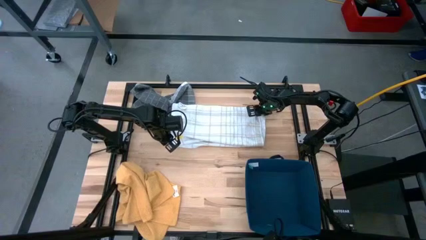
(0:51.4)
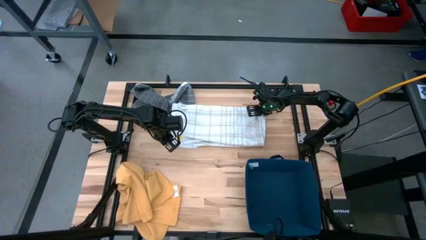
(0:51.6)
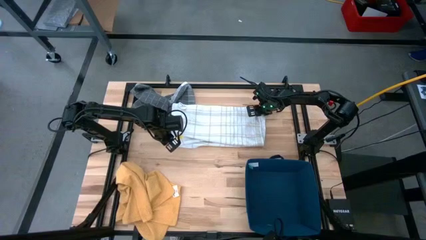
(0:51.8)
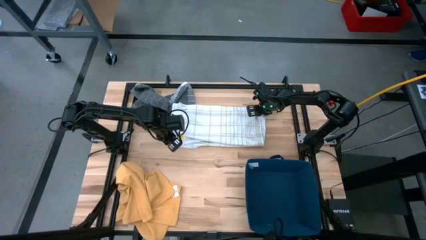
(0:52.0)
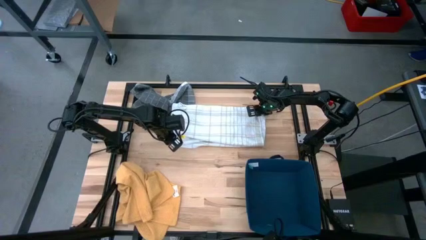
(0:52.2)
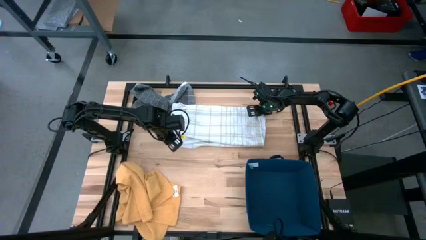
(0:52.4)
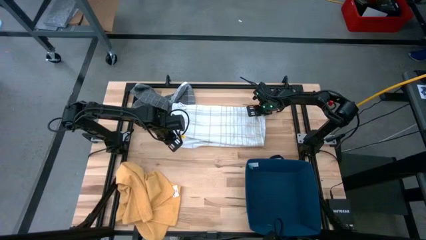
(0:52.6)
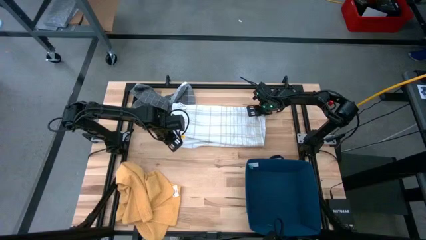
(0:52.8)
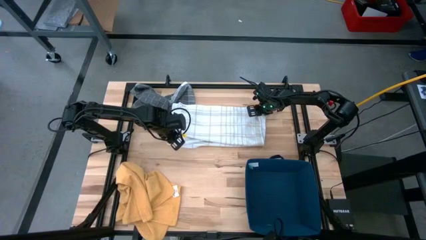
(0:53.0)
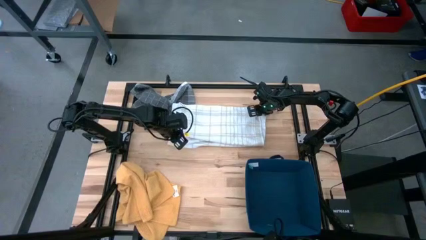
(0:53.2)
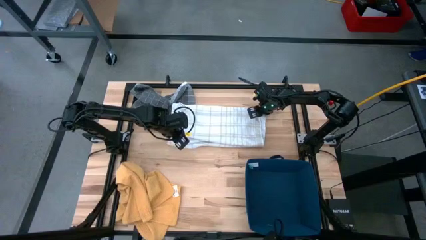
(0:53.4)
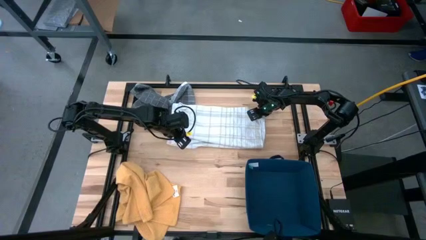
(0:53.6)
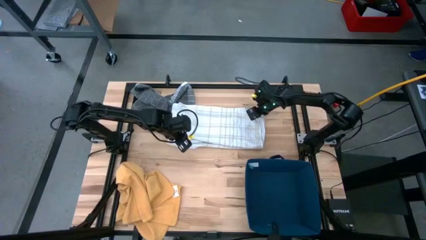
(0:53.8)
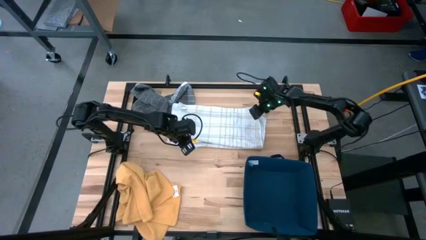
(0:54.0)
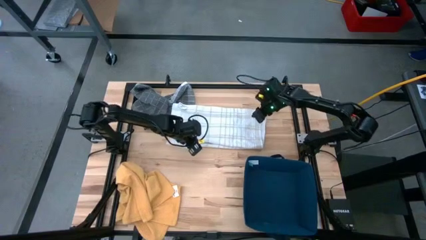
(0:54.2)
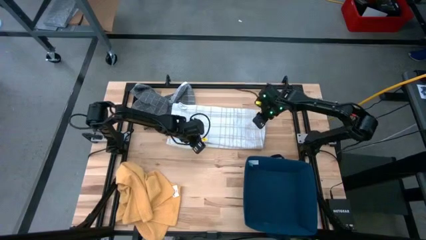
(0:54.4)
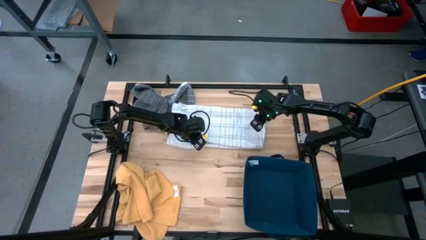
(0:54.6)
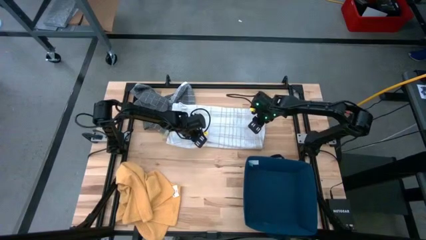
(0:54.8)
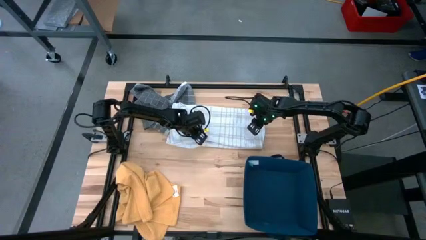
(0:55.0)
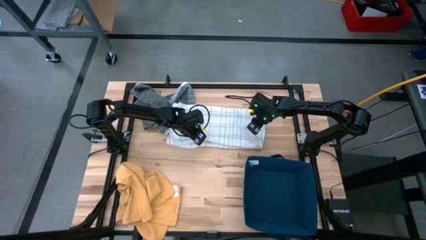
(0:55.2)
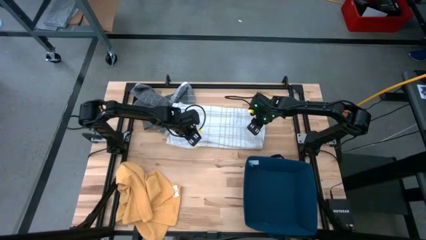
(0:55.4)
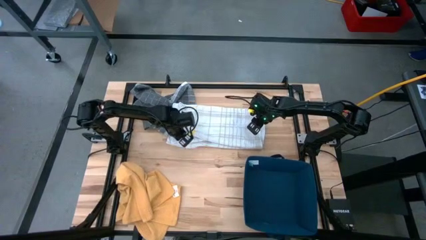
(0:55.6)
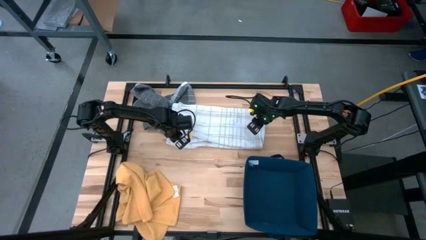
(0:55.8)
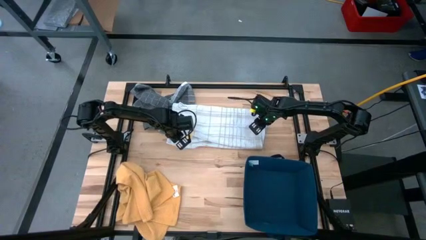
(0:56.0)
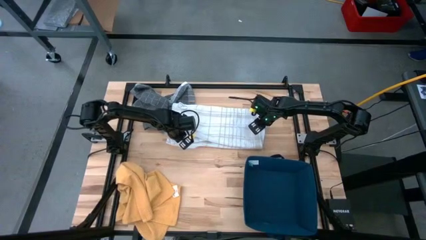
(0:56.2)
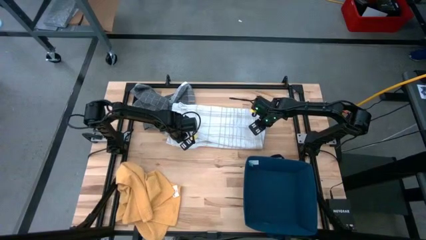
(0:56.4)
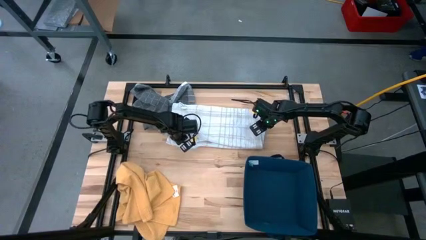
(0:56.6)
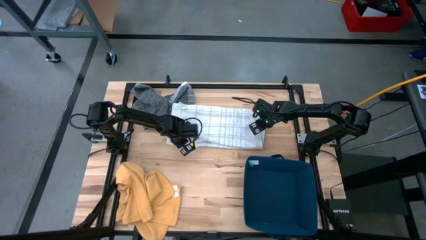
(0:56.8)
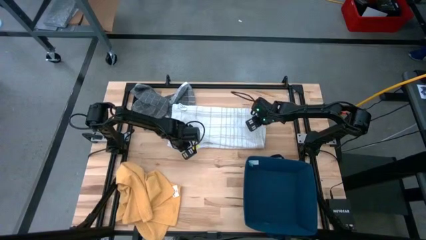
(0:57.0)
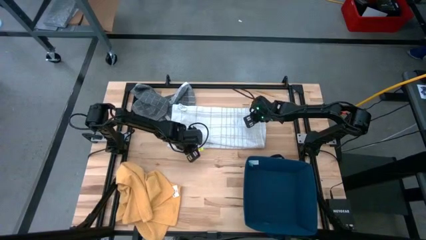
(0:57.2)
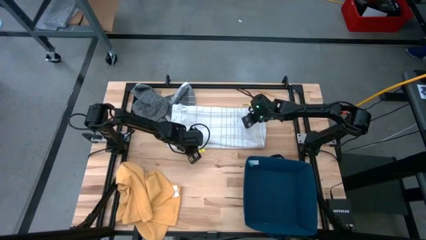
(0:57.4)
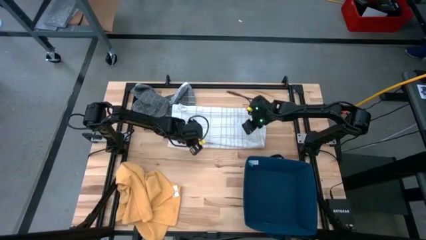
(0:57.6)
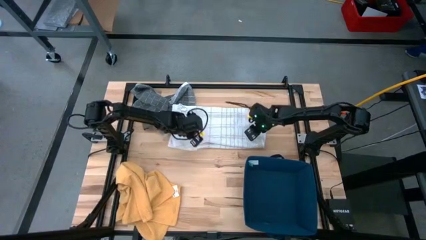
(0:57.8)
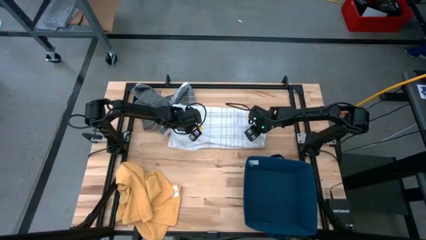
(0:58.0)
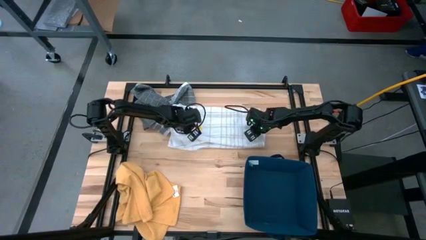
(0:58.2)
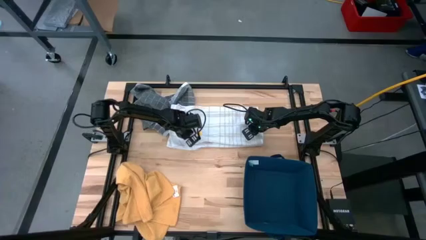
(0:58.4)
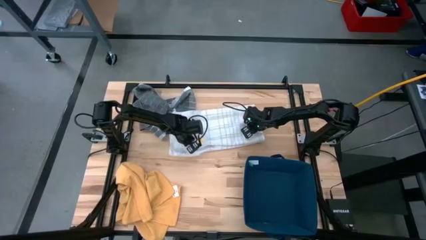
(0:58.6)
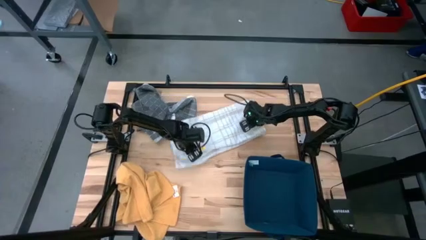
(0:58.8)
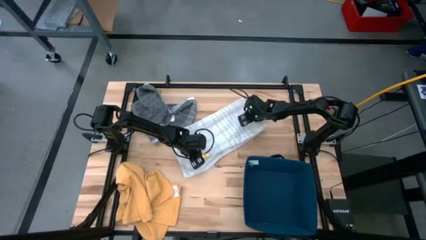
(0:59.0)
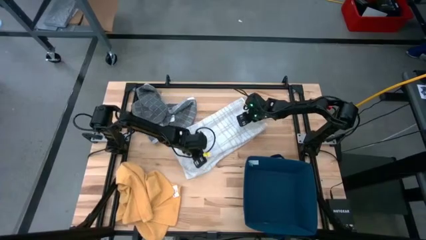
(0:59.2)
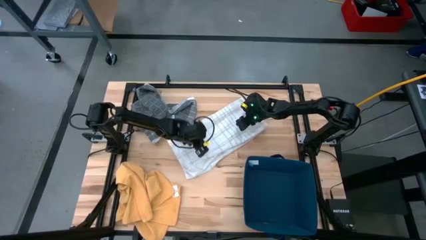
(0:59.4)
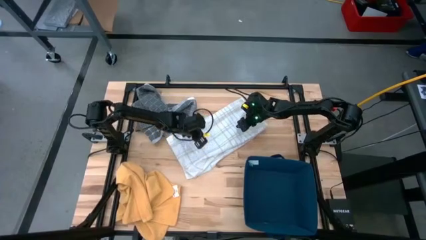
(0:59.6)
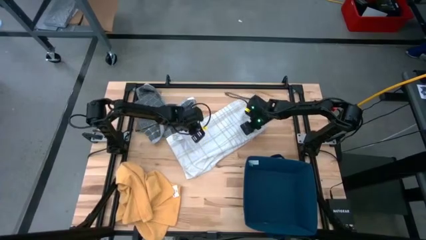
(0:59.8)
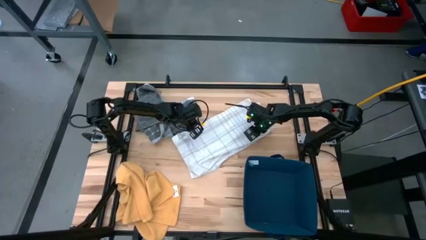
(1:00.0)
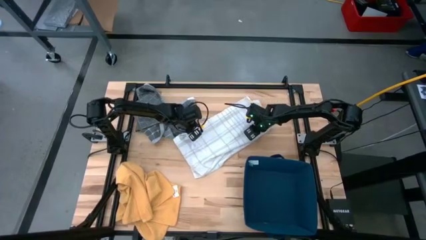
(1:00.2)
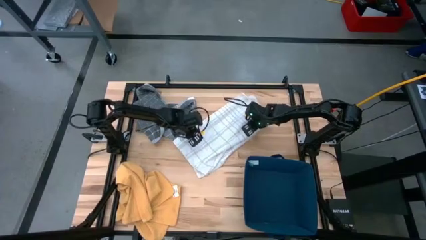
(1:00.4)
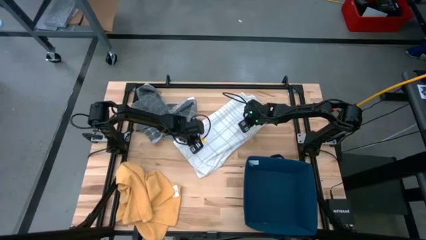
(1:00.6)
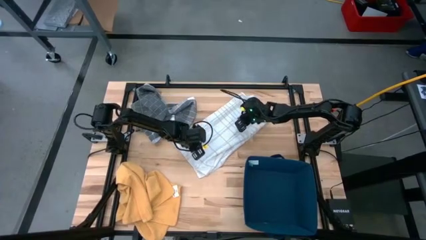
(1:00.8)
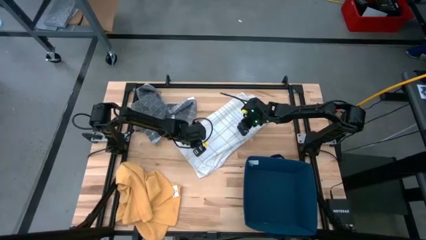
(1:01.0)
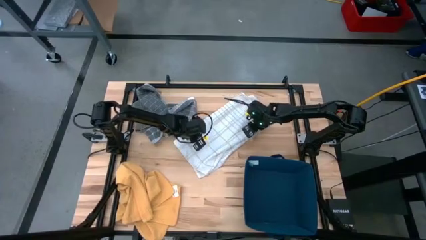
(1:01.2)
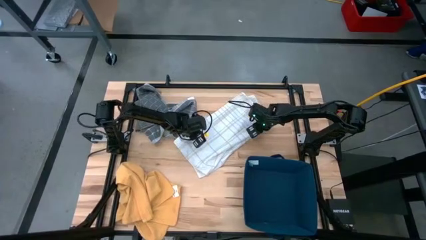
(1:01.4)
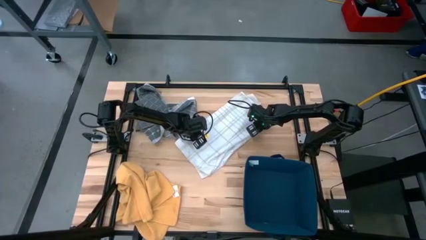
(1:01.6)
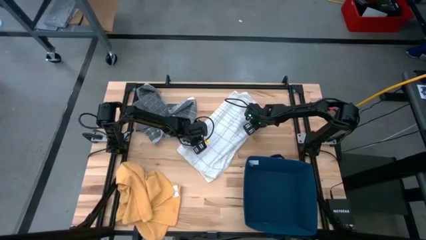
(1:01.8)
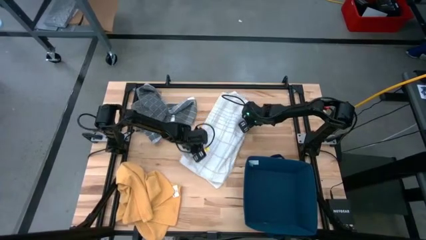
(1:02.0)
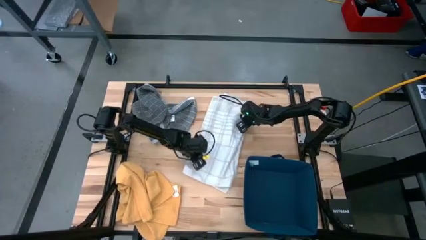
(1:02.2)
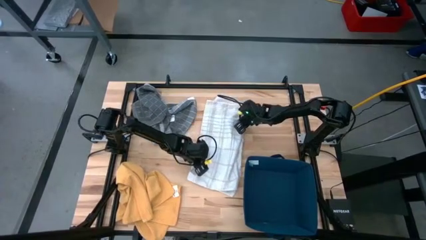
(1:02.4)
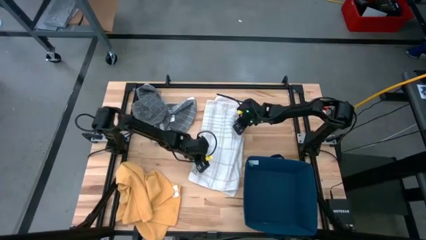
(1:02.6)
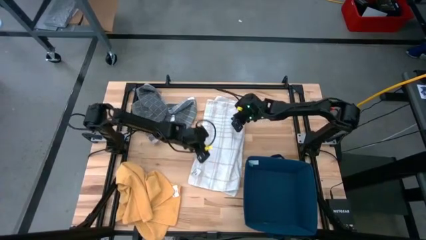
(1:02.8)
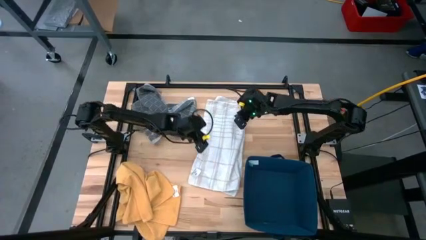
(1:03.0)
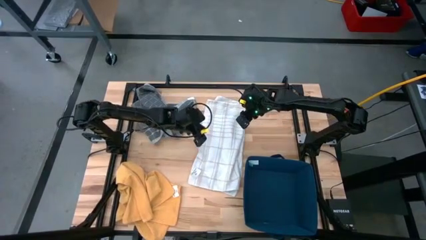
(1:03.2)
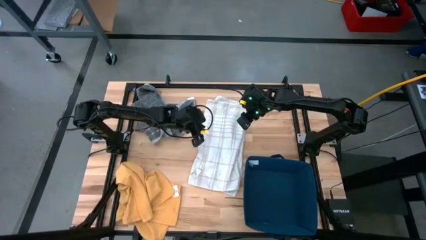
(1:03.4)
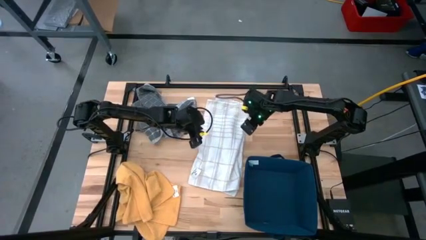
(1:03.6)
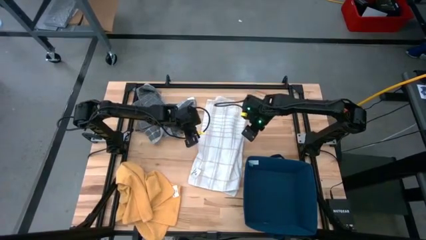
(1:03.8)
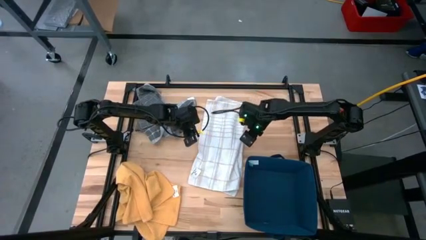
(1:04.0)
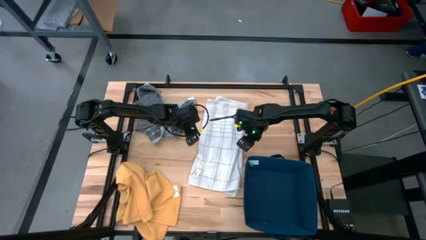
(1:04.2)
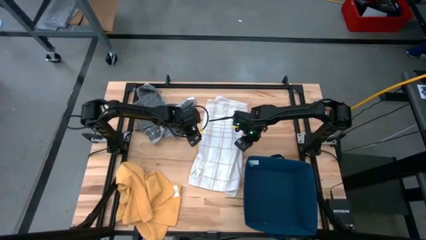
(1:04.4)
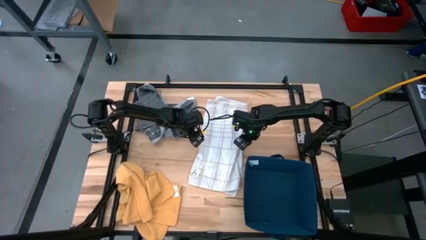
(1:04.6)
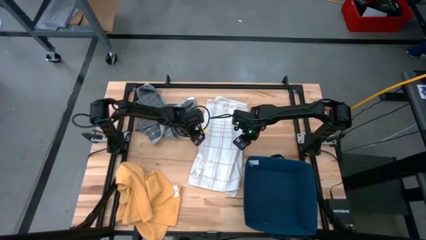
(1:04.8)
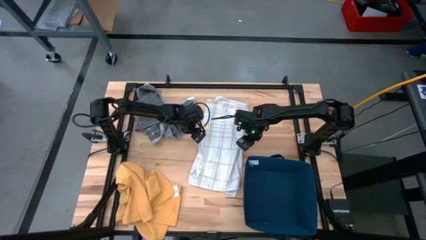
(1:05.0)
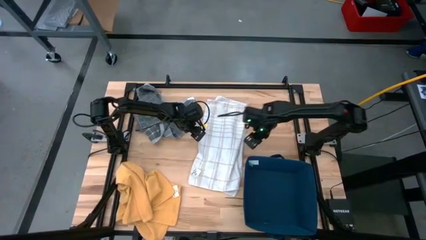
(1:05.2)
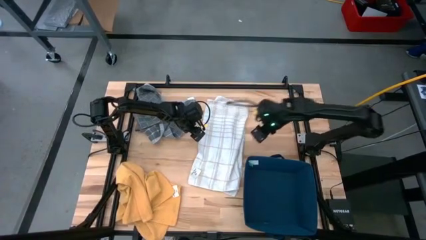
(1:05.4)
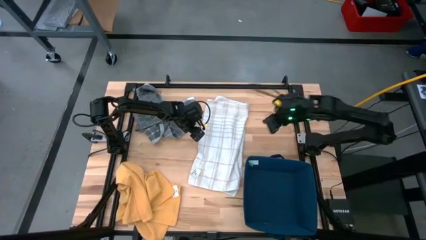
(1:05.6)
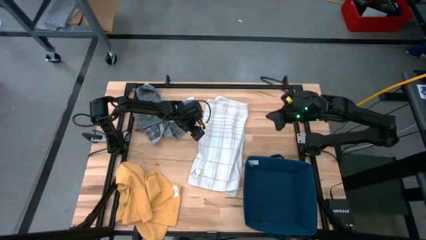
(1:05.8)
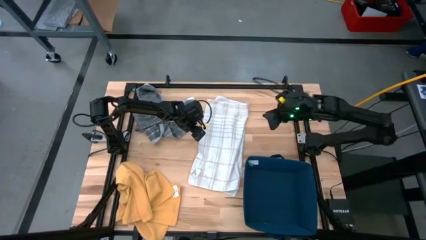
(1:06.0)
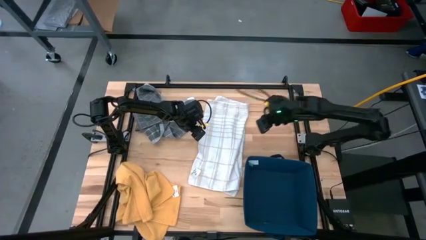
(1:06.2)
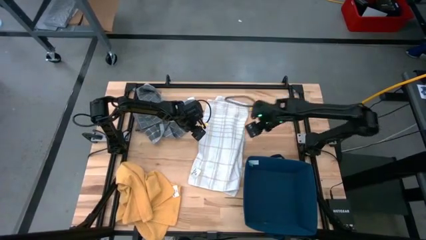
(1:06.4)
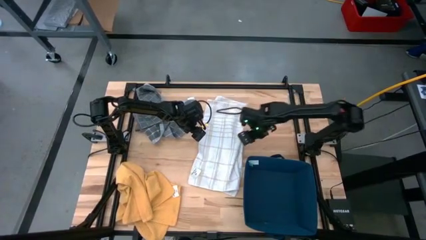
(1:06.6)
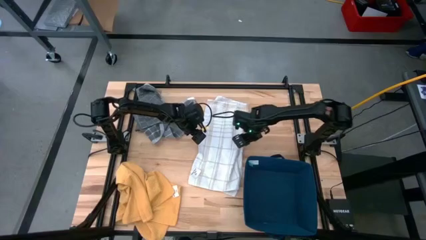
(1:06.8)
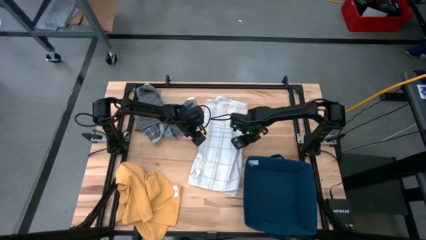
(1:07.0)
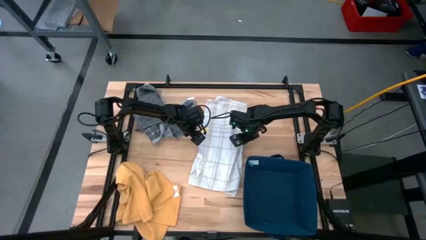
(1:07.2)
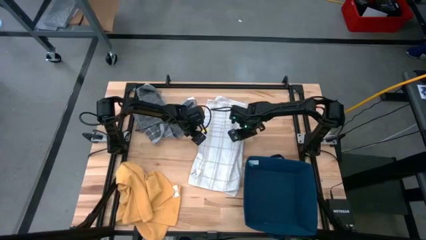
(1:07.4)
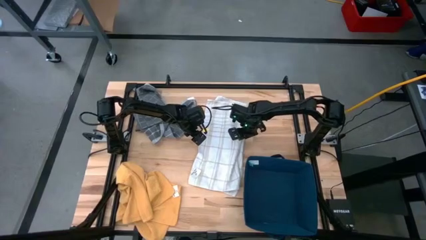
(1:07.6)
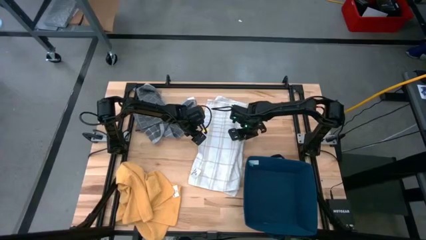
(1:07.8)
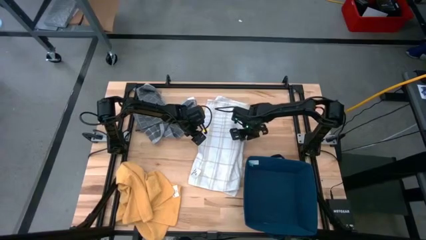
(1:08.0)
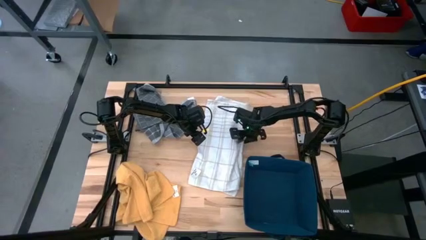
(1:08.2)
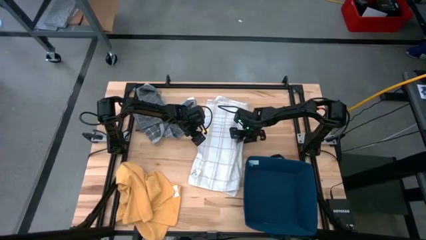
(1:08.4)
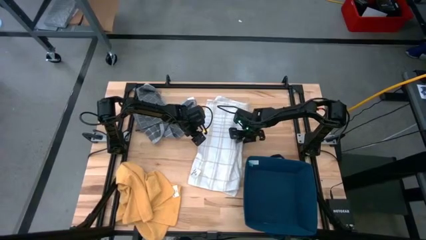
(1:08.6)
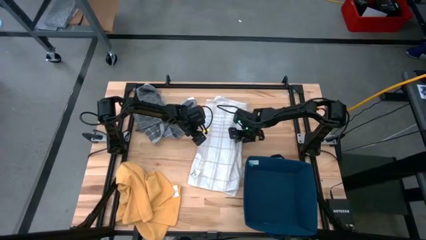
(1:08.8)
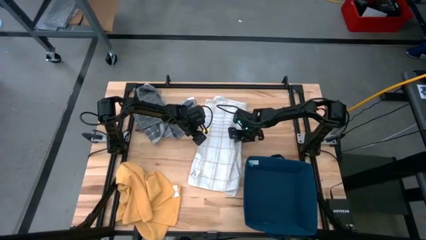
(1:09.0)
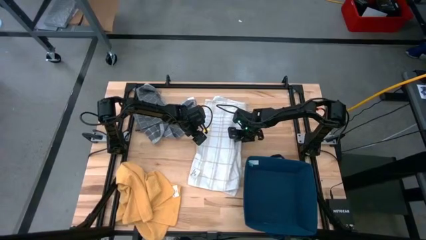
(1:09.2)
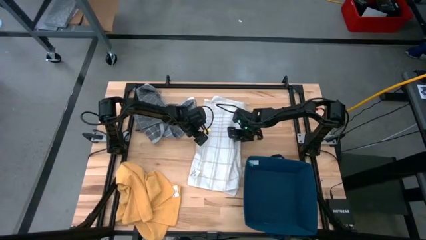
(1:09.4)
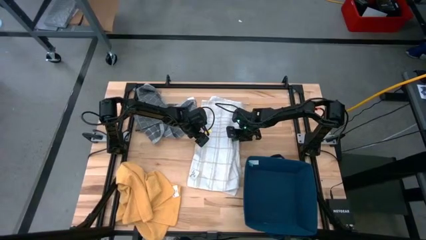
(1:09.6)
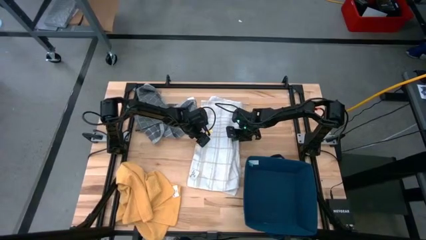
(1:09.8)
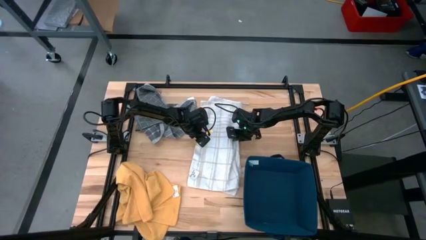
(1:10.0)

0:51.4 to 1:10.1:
Task: Fold towel
Fold the white kitchen towel
